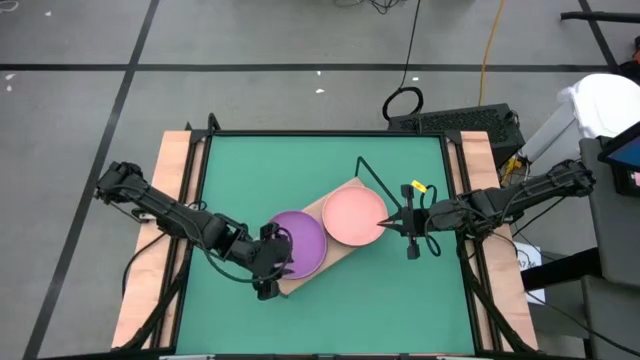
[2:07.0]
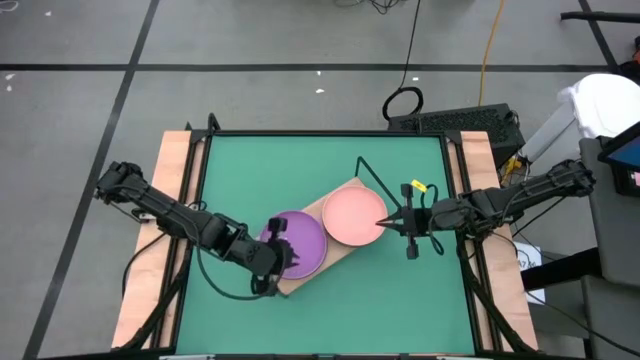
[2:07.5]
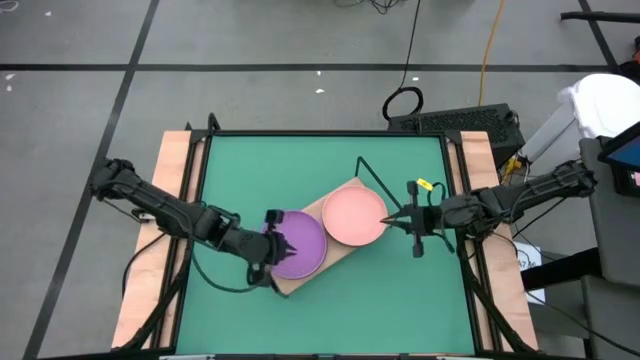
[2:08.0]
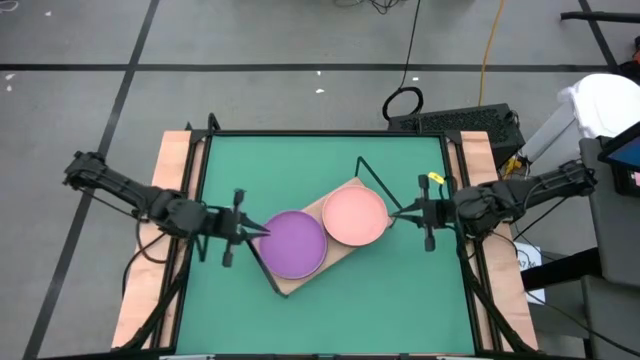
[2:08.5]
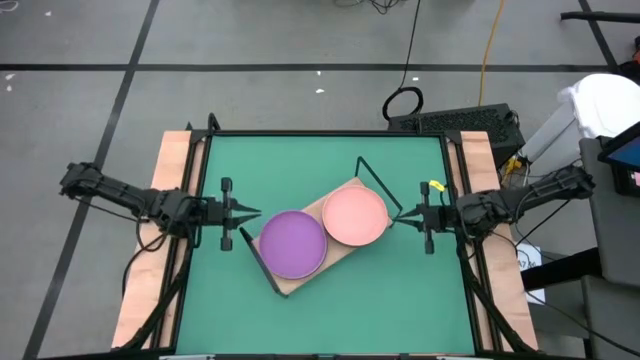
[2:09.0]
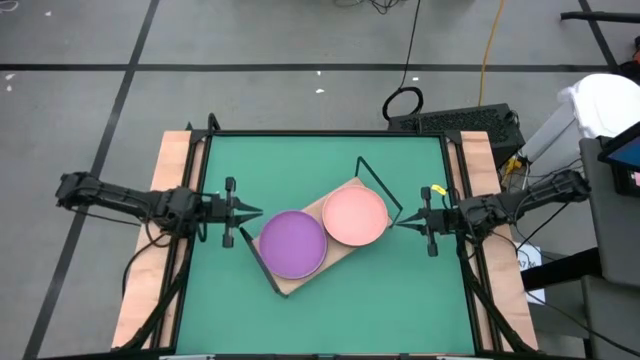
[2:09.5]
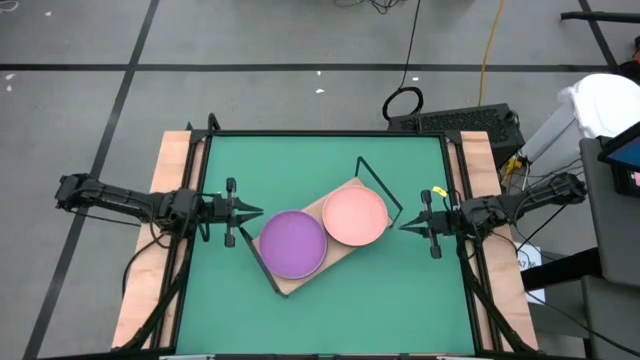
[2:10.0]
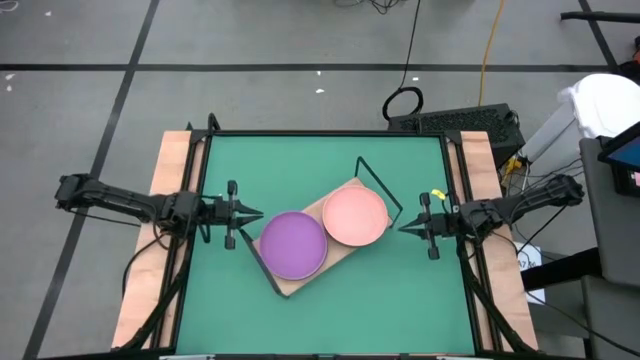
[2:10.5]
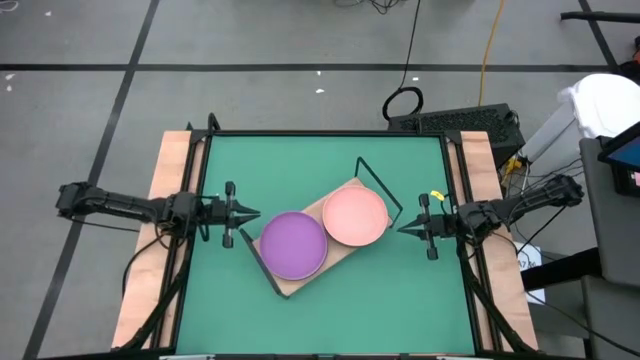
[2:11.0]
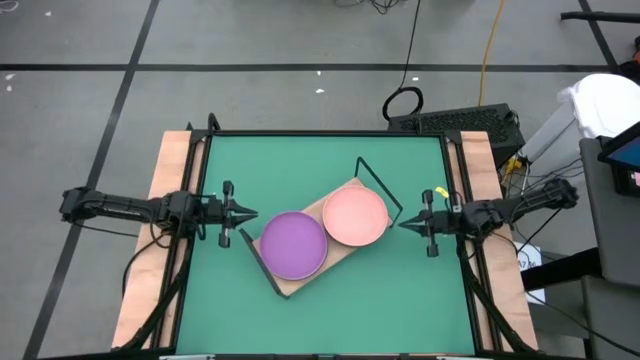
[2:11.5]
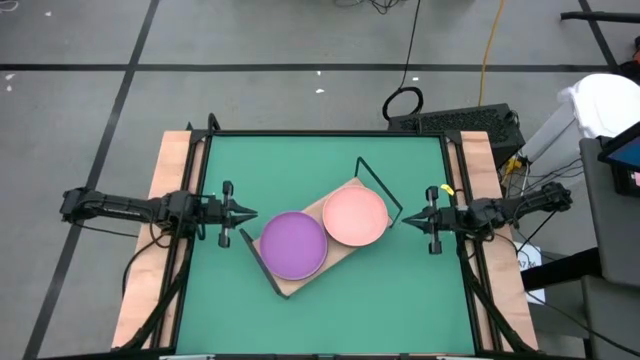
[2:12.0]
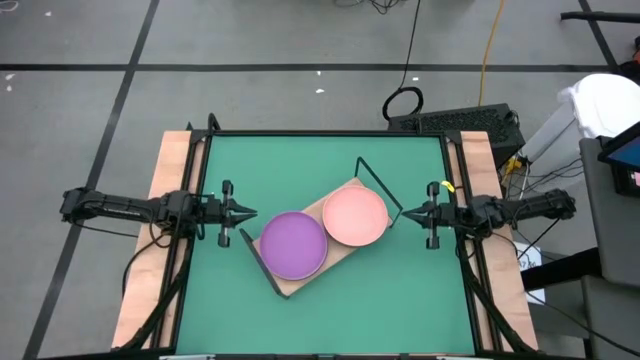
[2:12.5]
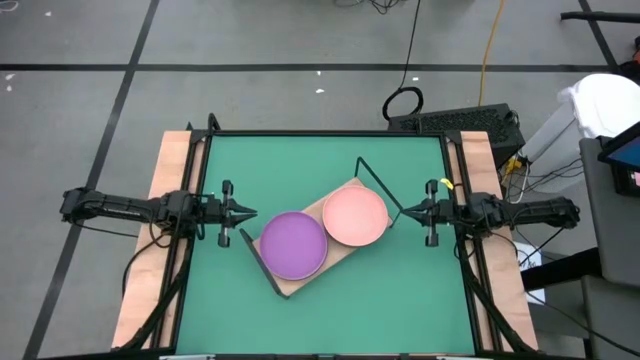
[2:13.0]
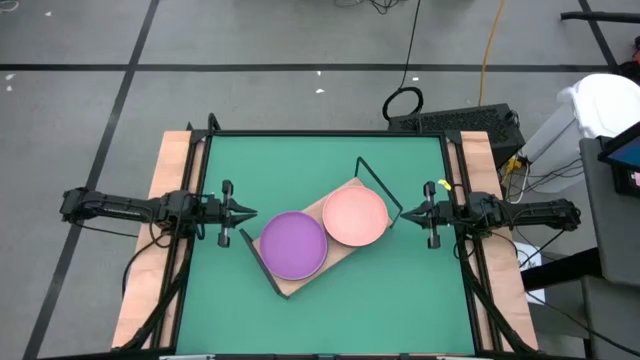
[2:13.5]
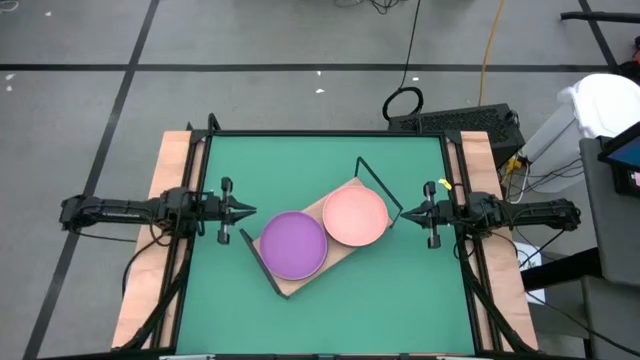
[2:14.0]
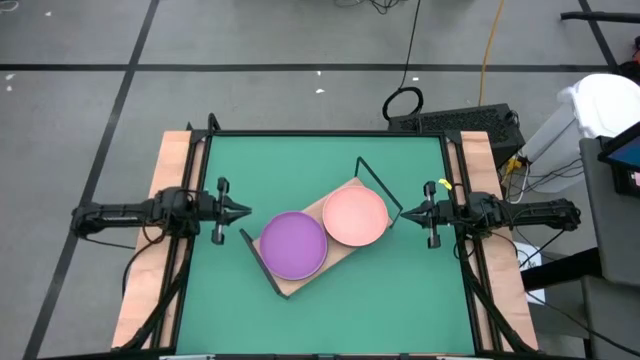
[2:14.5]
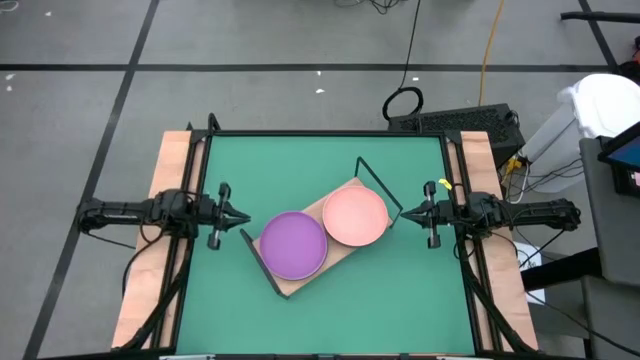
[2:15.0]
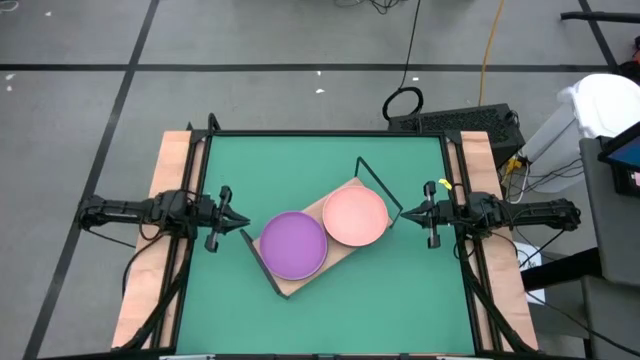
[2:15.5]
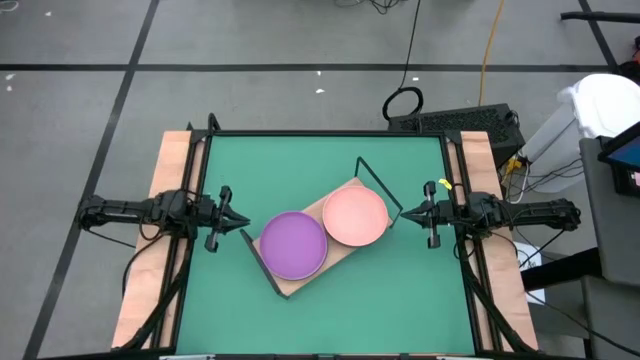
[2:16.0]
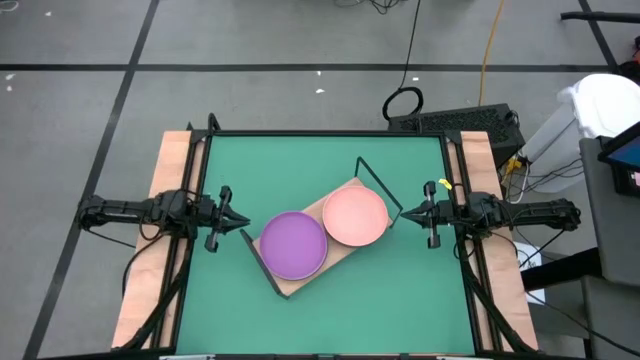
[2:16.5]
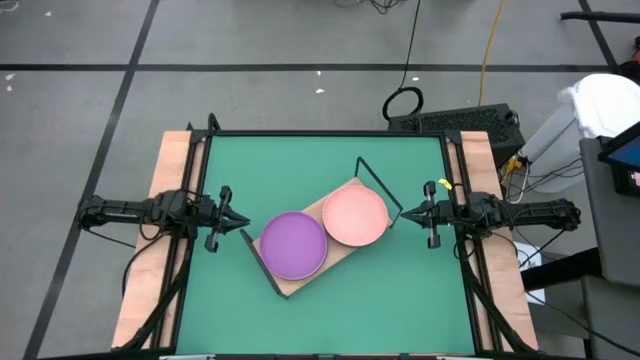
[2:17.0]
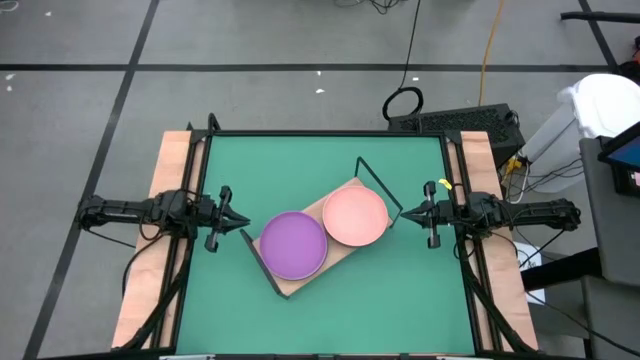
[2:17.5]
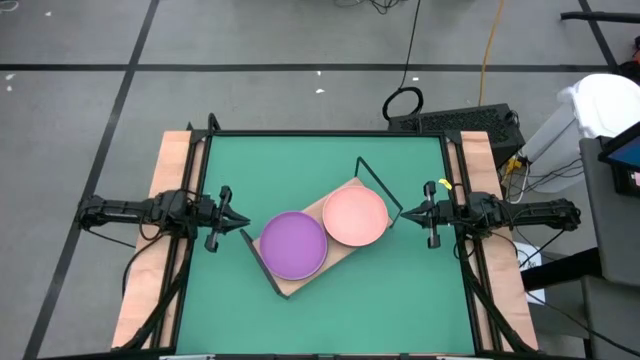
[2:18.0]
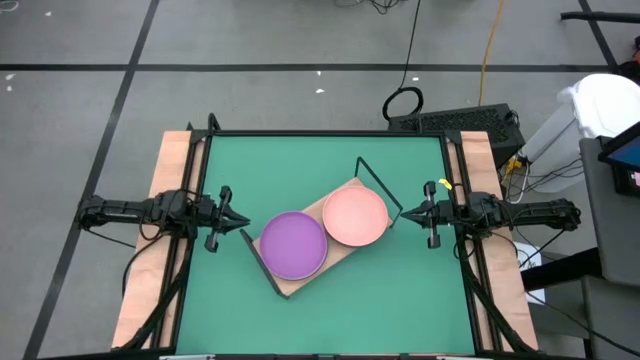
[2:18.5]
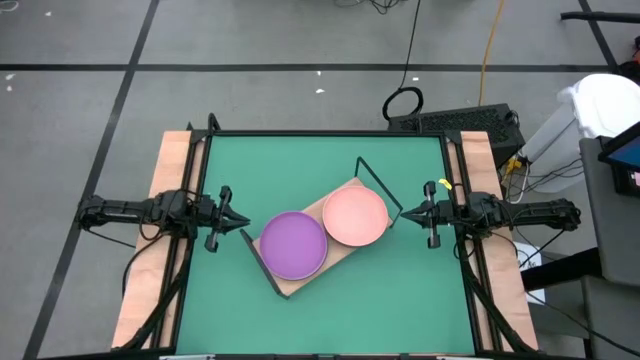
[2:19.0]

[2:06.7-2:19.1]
Task: Place and stack plates onto a shelf
Return to Home Position
